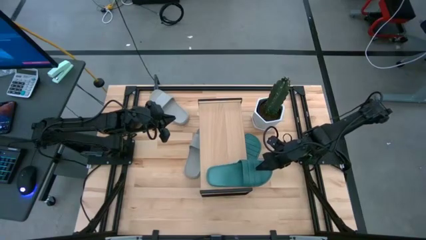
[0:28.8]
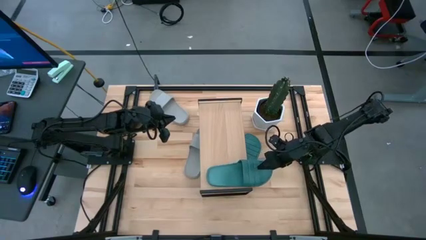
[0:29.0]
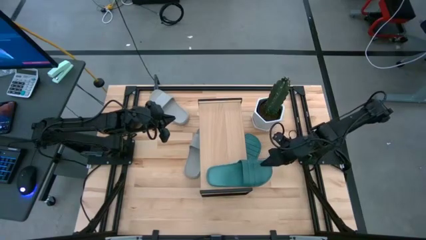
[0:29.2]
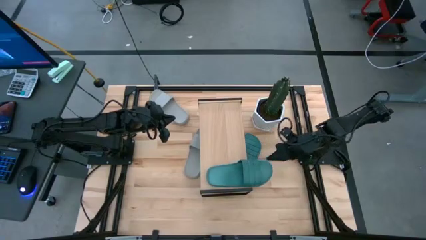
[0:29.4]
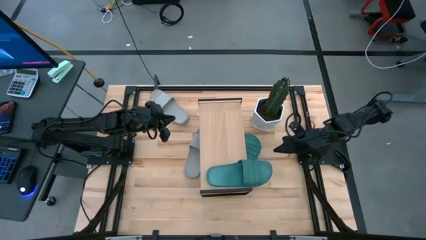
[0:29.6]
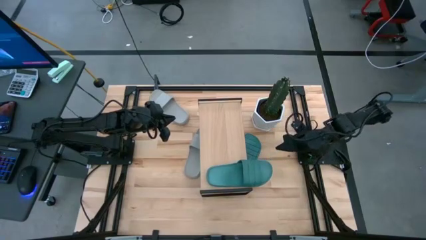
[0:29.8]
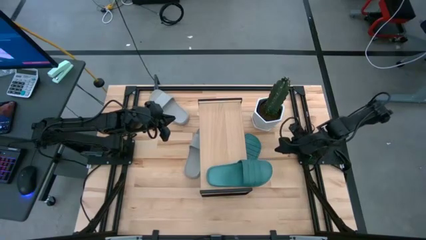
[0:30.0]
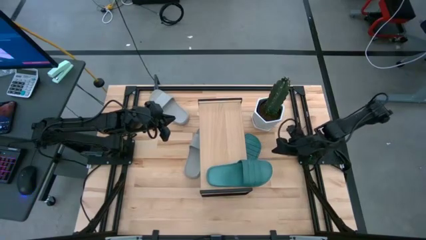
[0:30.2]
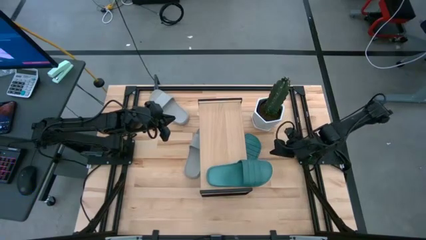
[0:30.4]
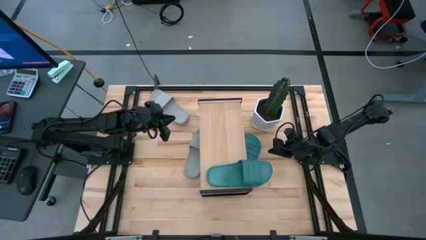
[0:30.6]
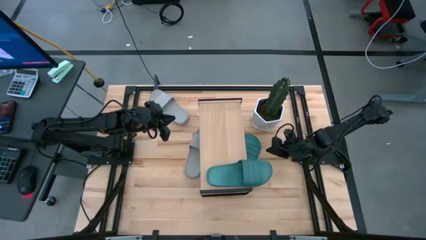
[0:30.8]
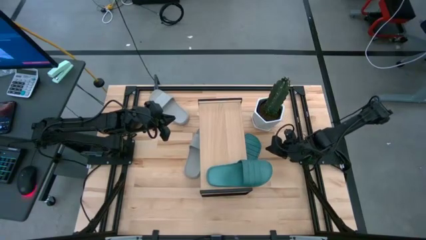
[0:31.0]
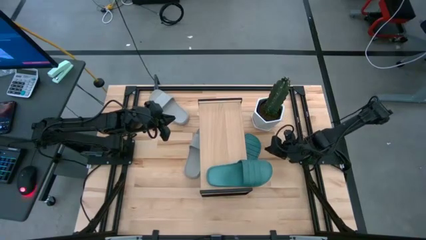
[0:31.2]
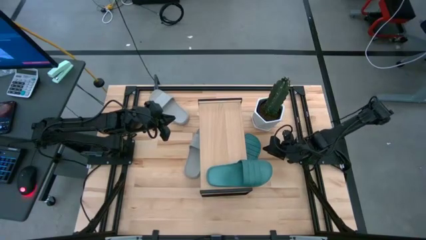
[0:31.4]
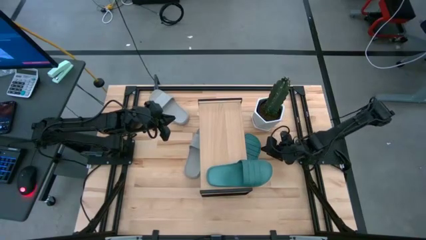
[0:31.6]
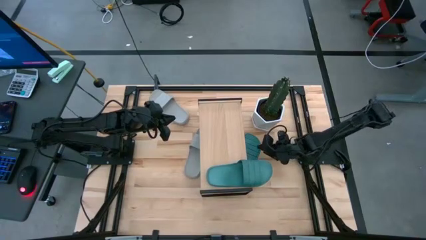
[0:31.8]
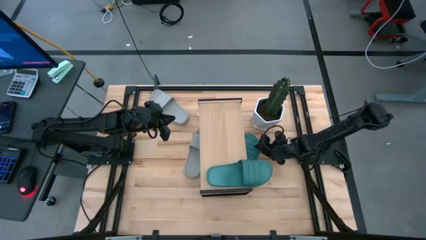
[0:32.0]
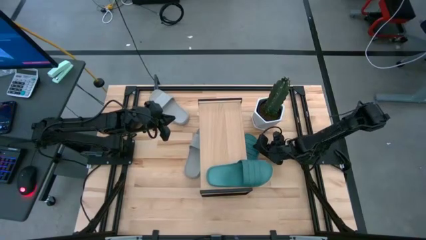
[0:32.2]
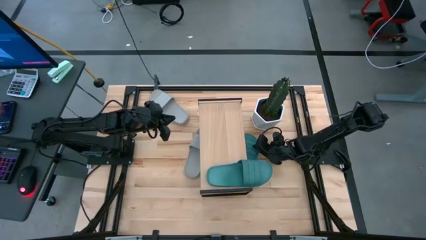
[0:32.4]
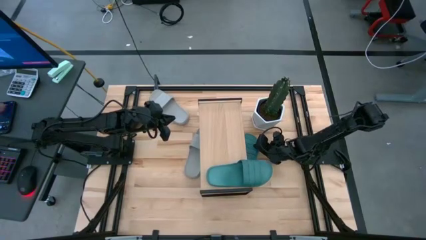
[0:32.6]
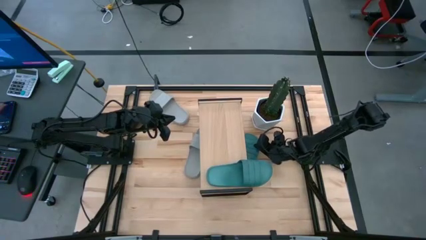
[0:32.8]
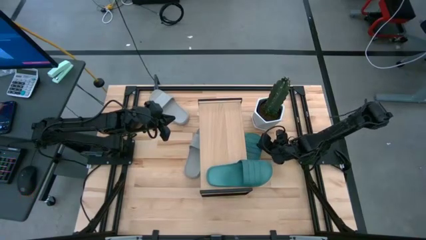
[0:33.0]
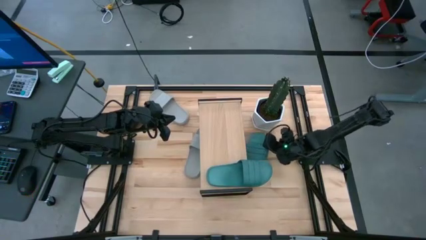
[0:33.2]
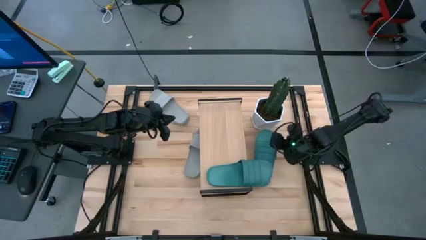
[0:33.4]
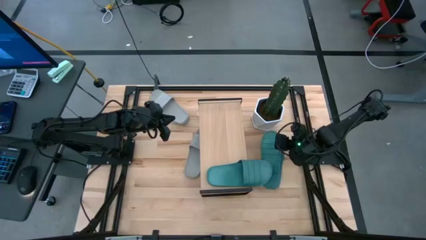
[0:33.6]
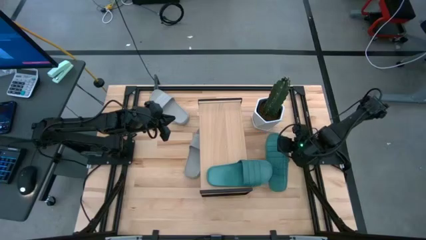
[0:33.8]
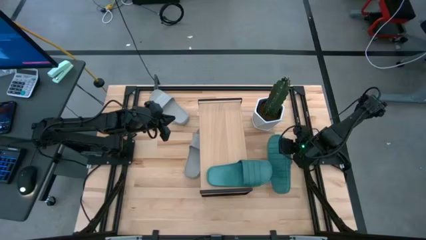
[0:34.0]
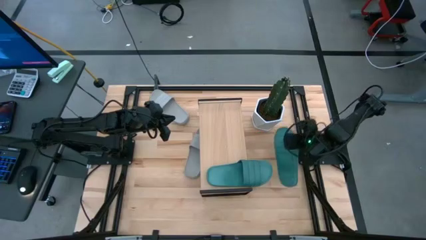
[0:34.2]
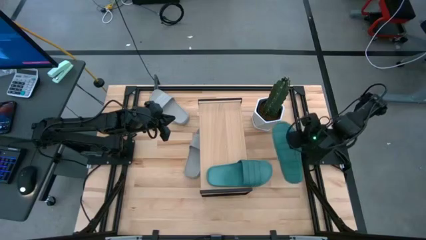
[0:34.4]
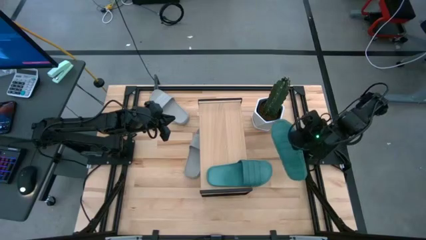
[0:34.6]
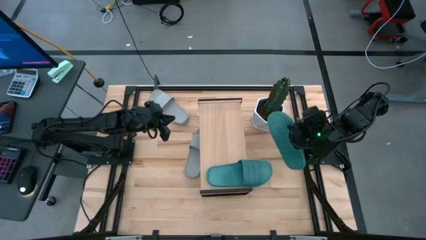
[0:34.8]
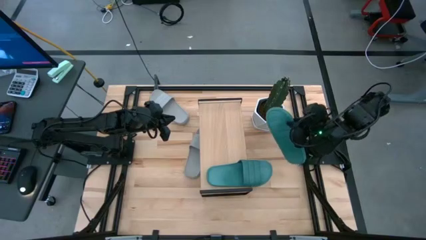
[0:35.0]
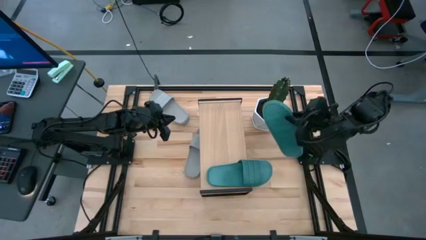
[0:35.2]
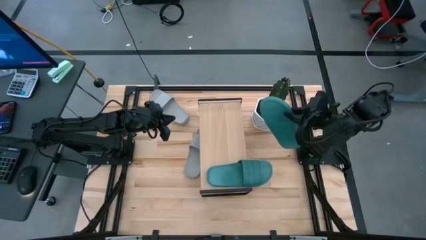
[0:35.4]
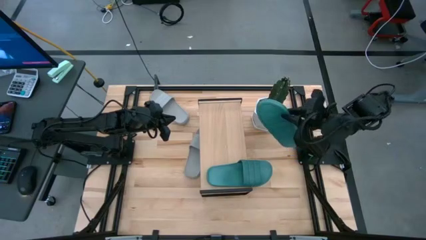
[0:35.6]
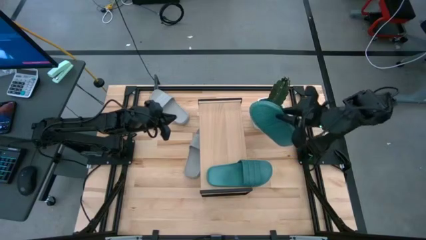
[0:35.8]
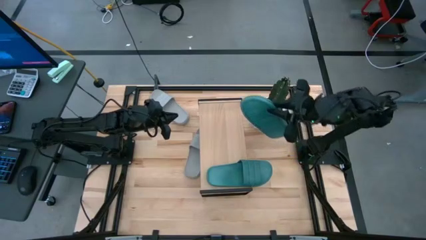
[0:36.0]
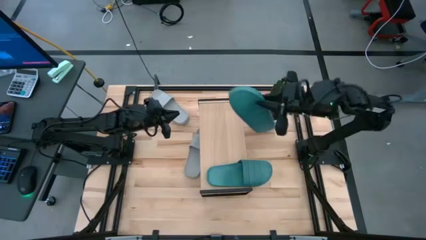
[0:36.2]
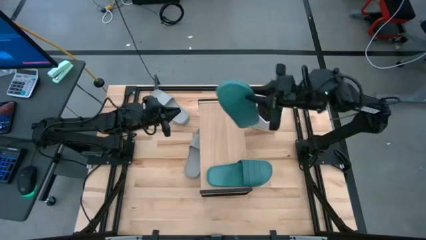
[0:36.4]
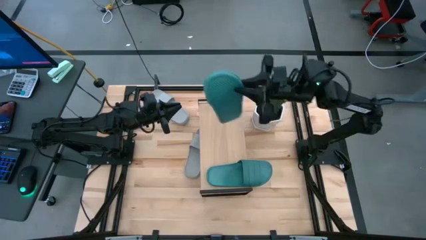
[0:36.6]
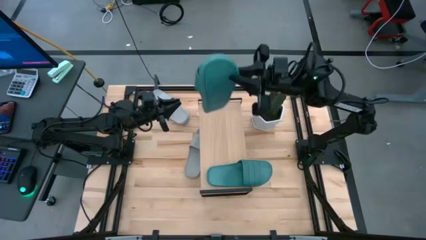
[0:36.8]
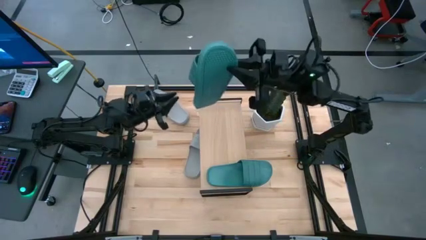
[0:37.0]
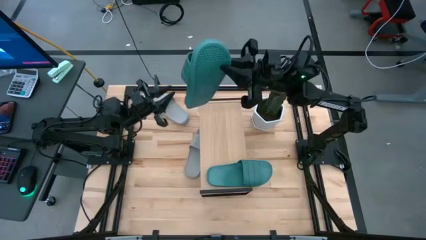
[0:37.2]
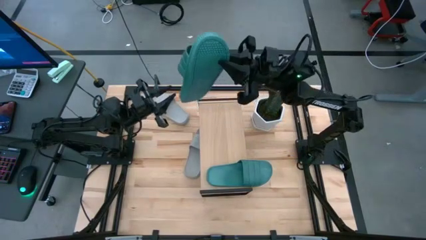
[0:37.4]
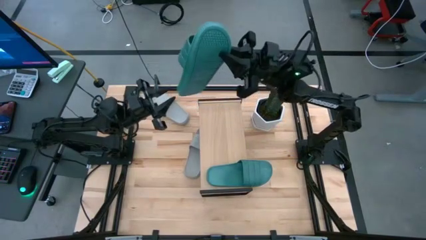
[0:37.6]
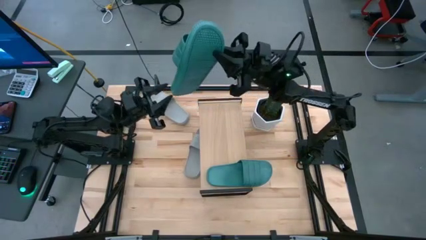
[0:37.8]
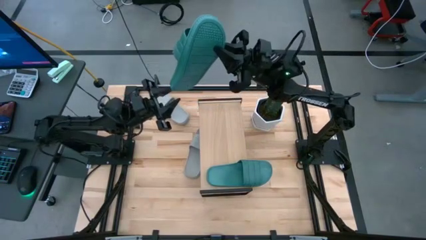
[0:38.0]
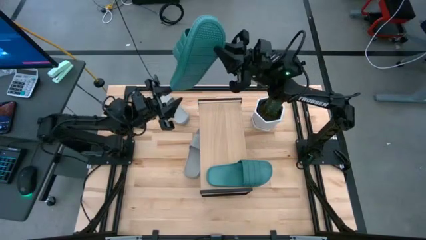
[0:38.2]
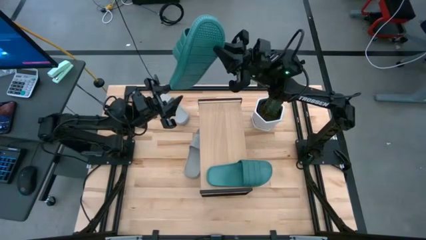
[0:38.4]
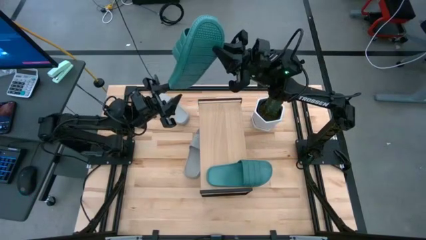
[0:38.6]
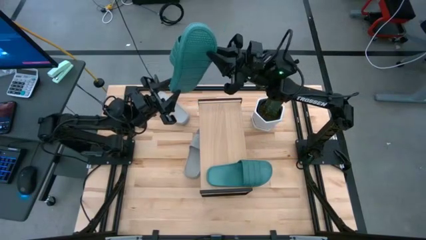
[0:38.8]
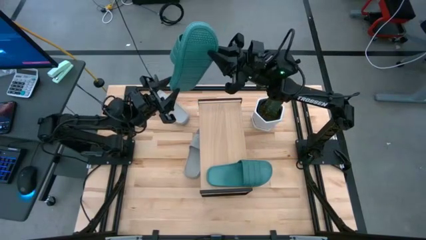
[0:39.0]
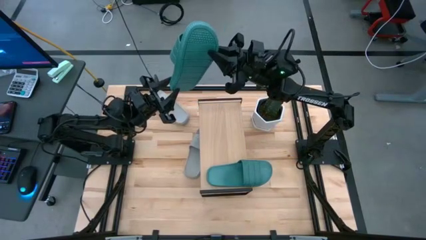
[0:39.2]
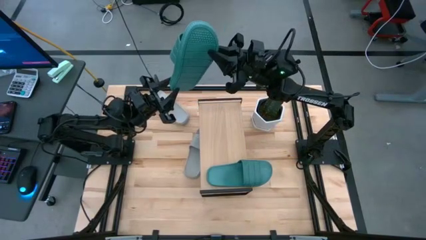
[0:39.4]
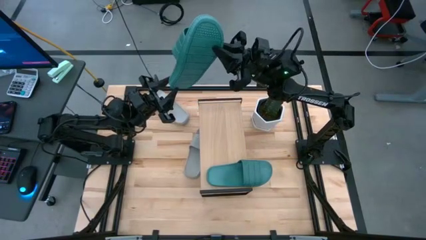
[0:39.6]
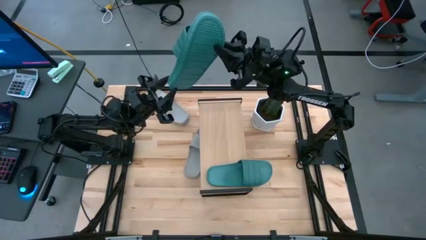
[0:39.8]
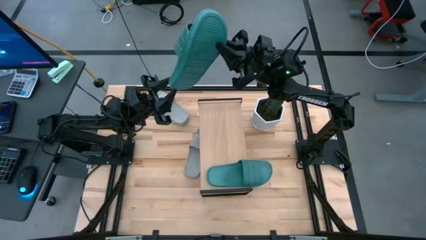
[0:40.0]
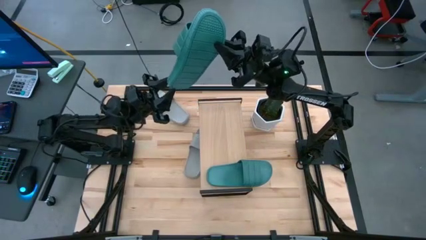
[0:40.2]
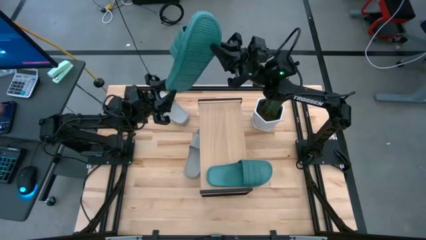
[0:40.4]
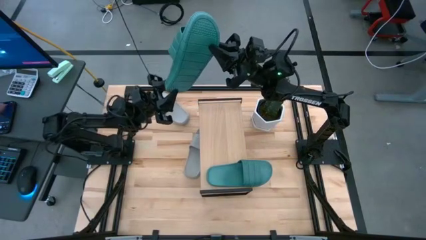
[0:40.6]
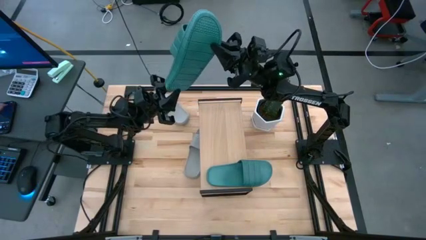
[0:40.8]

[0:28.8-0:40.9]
Task: Pick and place slides into the shelf
Put the green slide on the shelf
